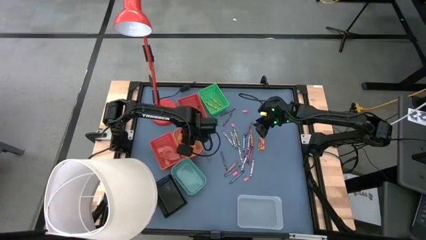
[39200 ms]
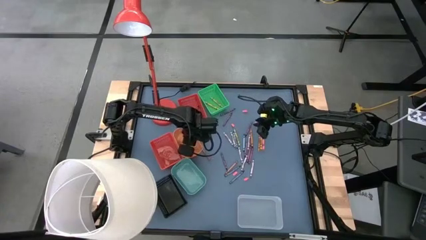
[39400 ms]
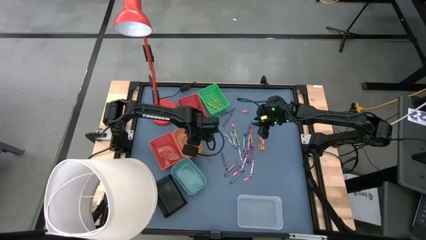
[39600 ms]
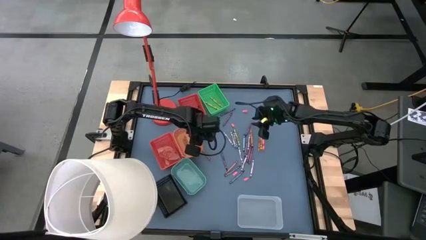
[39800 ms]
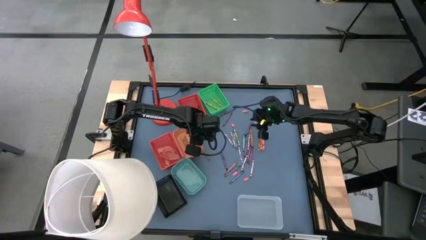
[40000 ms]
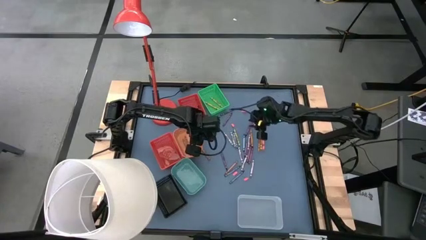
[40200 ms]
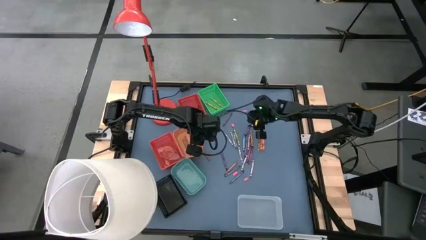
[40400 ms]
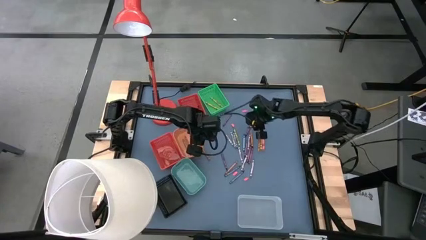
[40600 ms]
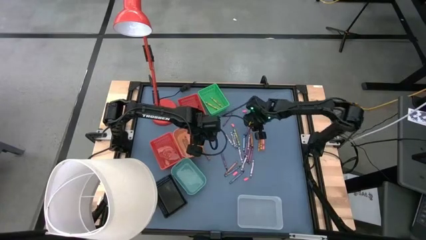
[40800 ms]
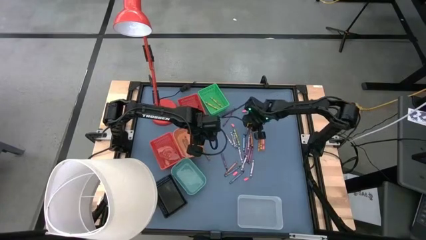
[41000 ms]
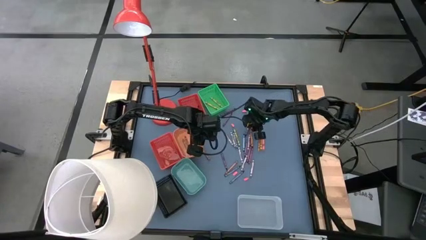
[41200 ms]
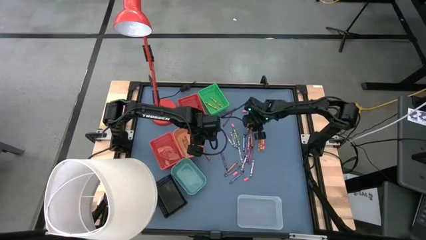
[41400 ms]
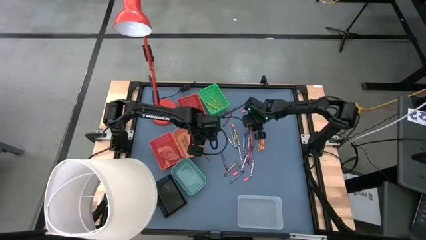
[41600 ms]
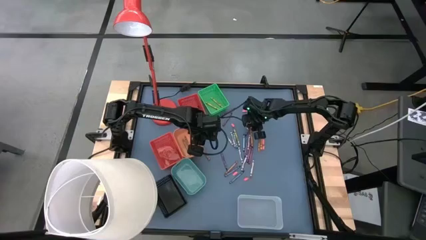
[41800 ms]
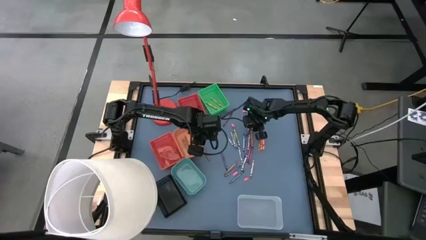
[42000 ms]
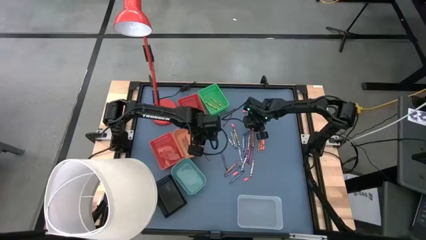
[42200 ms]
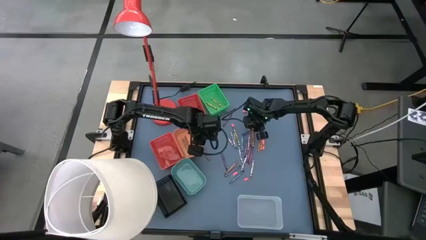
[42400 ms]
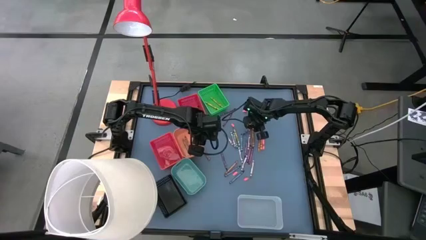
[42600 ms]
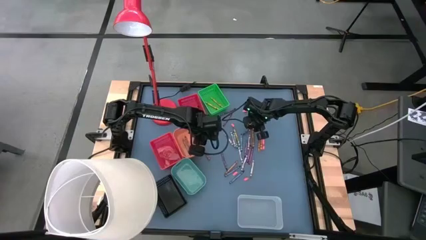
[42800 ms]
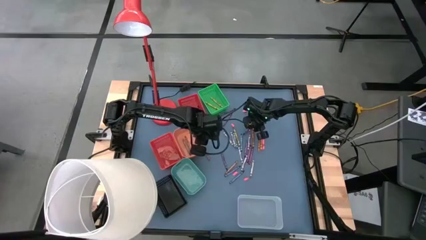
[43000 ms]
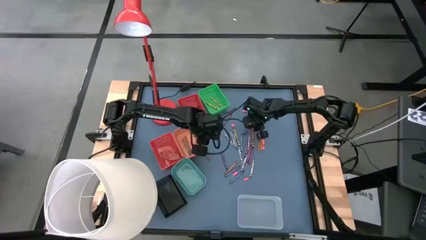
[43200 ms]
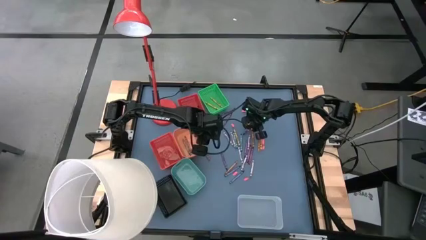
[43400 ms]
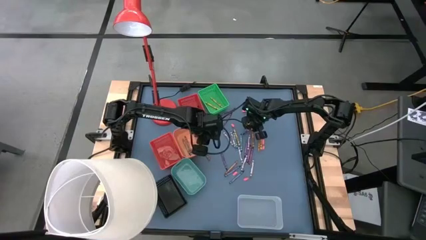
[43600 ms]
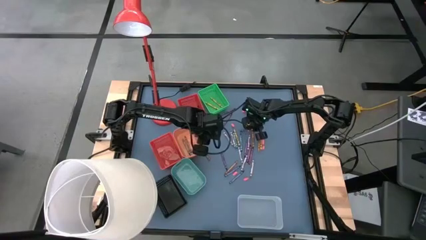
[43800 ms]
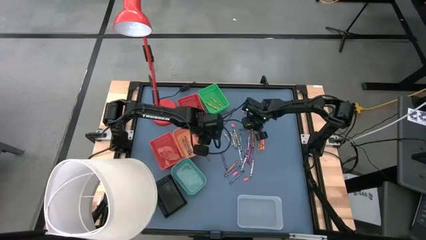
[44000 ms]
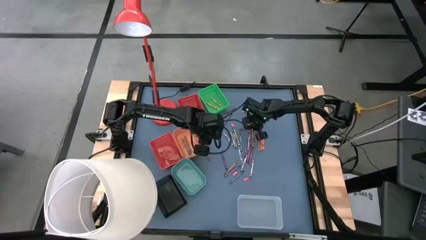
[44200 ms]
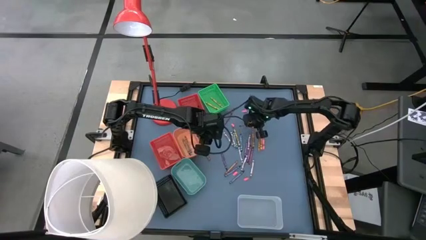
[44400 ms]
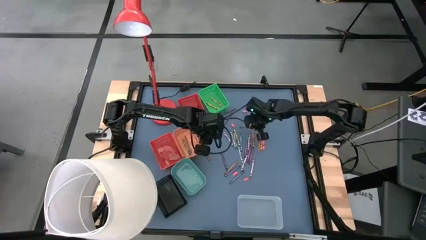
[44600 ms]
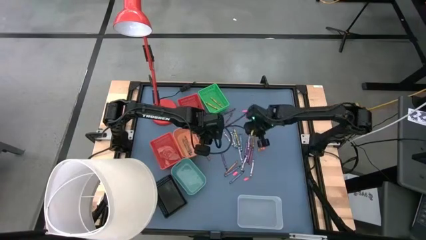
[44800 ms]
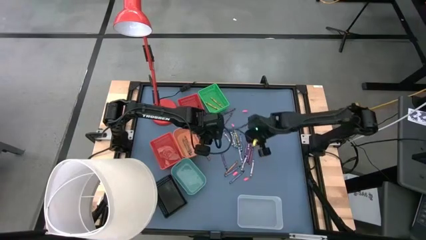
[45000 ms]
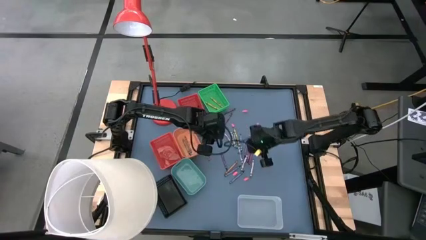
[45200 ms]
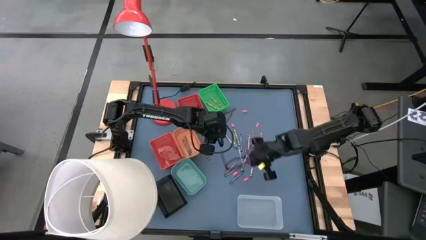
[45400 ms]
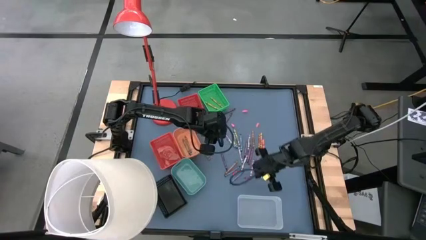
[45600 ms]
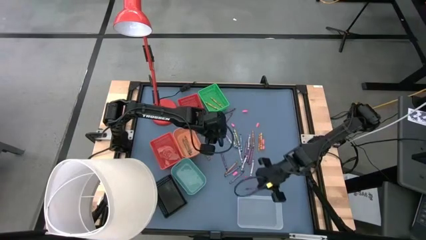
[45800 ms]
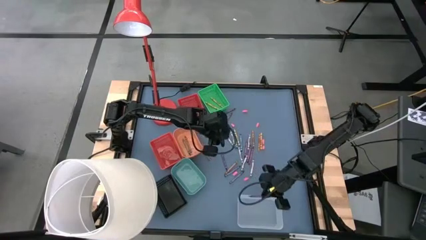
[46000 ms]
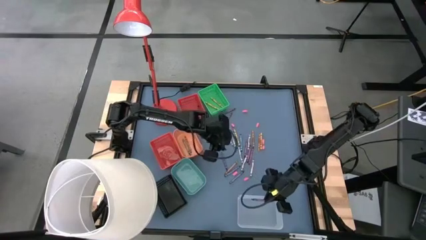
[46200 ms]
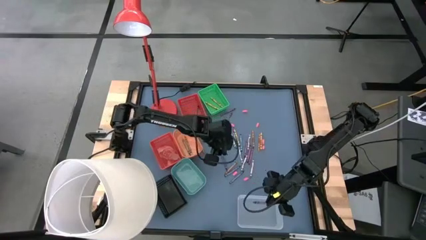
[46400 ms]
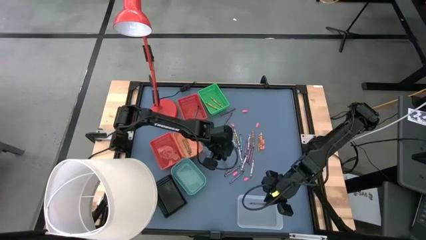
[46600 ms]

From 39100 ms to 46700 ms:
Task: Sort crayons
Put the purple crayon into the white bin

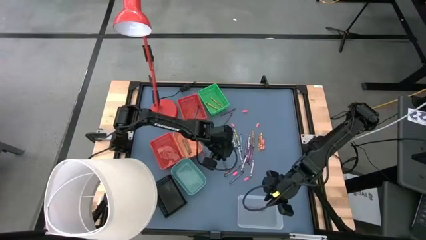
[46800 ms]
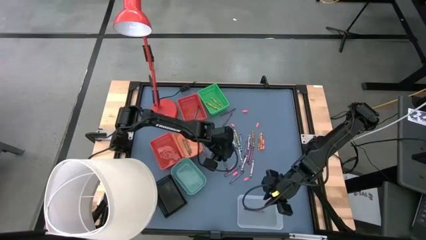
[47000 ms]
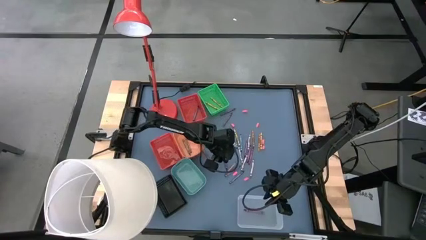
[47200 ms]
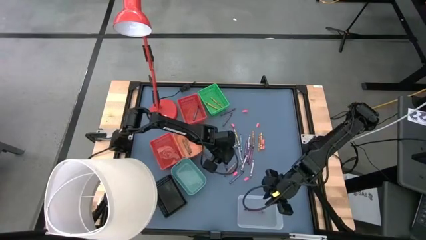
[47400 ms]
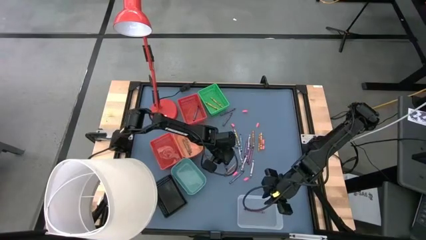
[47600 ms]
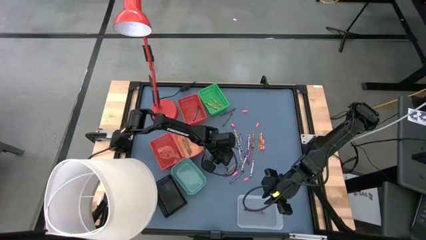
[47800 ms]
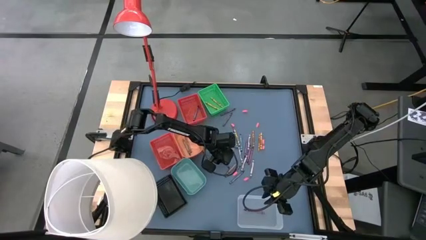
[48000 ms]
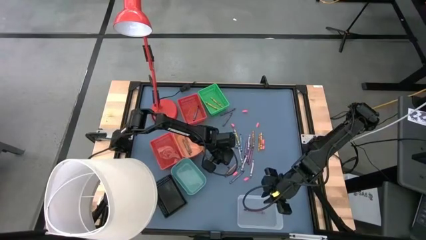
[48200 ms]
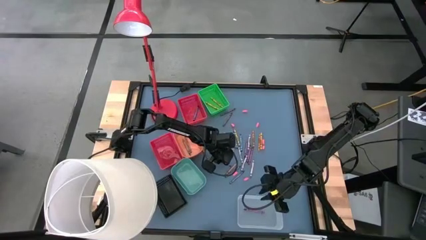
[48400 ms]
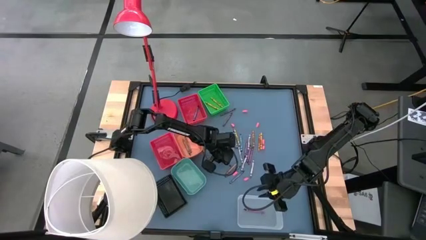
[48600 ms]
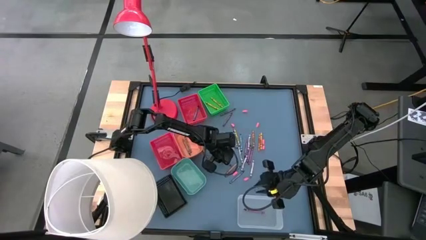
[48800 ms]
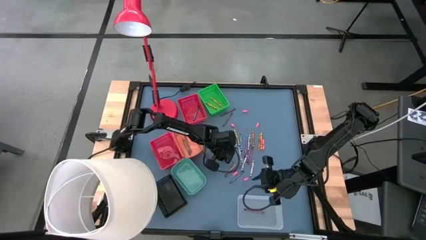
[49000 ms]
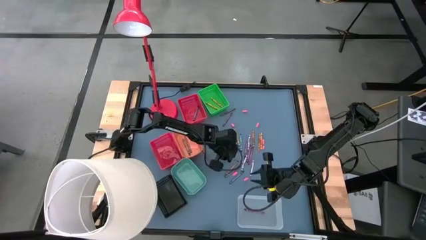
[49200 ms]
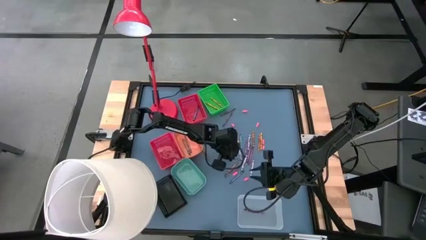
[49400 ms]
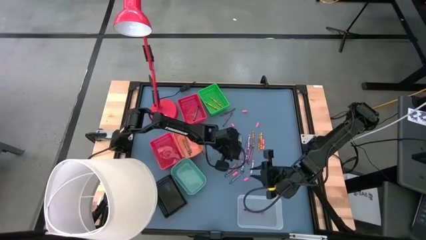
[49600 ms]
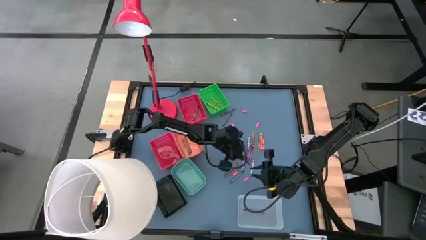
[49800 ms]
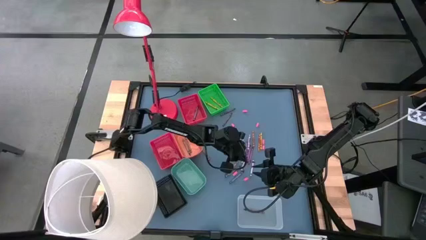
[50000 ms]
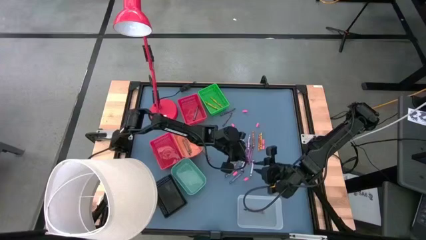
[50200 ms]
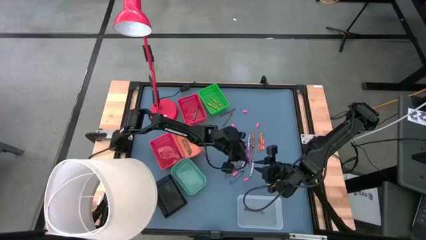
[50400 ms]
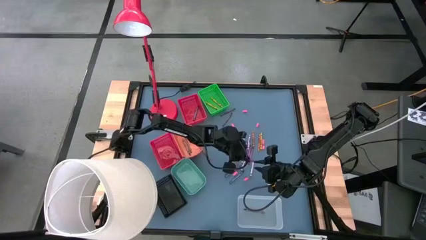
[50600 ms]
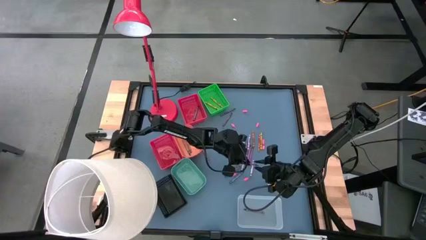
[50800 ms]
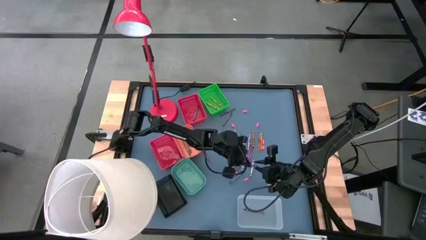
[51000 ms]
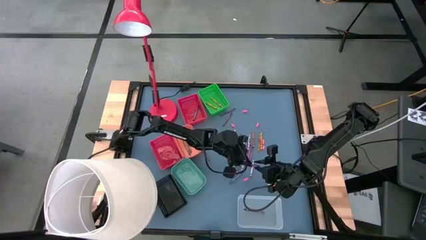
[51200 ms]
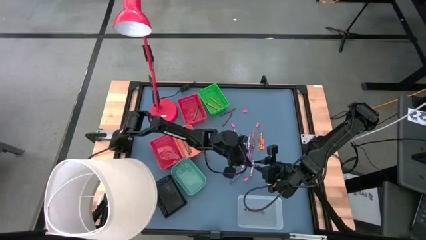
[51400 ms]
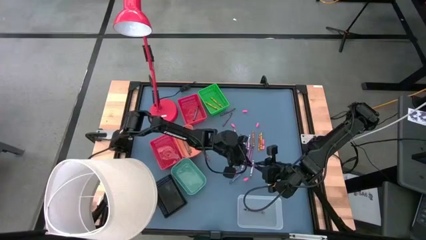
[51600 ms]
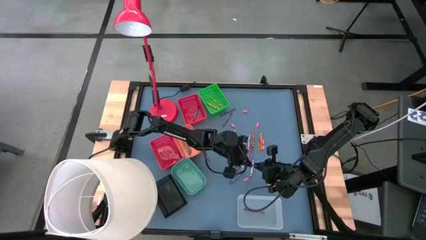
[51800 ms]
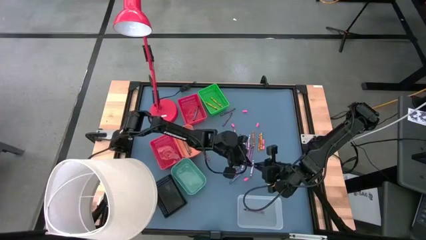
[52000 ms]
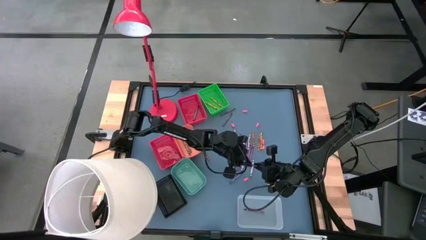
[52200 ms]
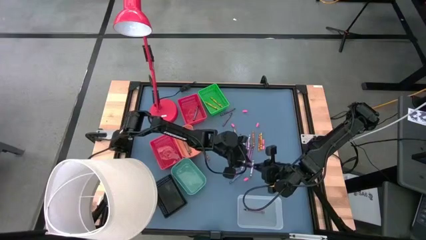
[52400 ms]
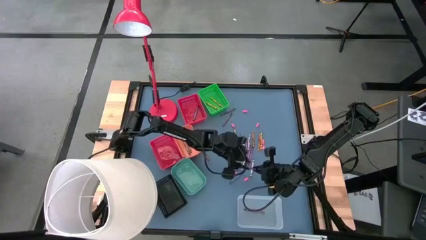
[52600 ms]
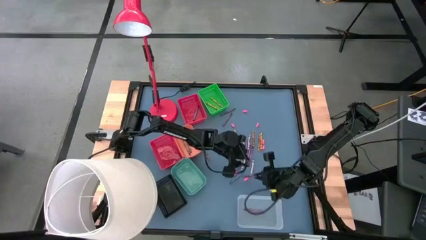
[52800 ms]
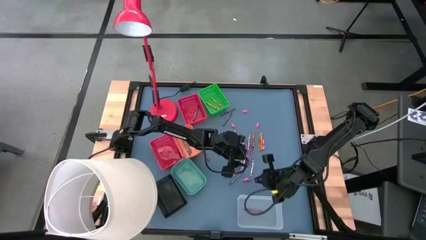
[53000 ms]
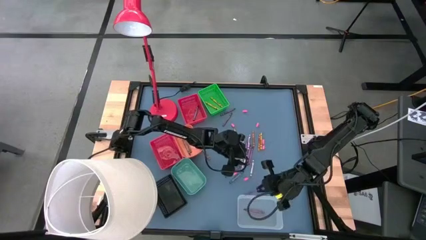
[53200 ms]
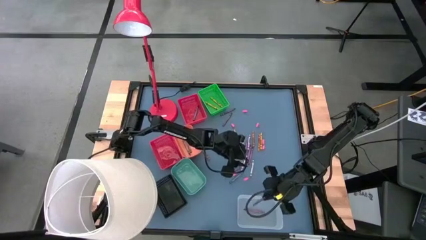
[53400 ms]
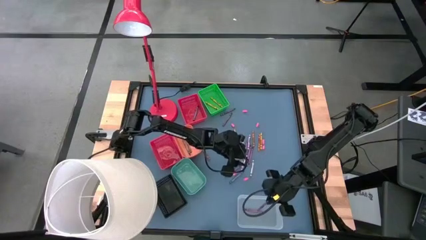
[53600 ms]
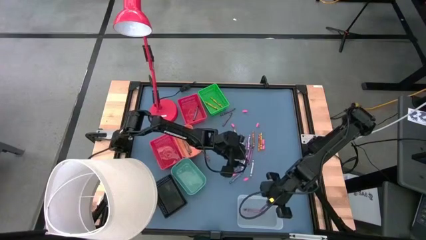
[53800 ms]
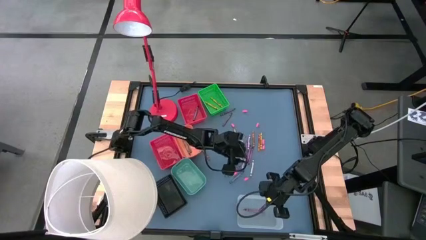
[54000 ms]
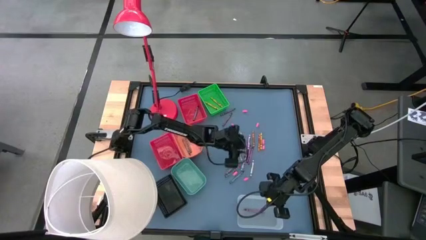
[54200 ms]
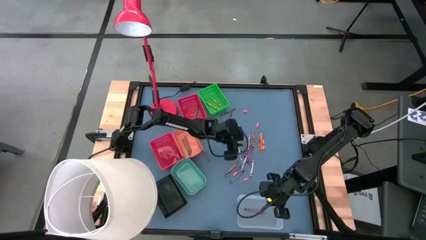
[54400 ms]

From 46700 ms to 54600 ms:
Put the purple crayon into the white bin
